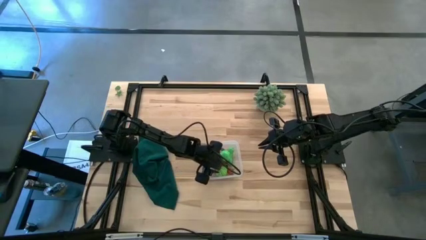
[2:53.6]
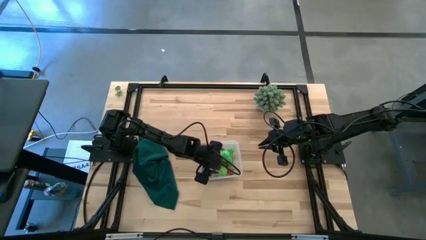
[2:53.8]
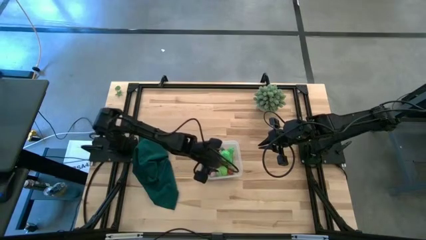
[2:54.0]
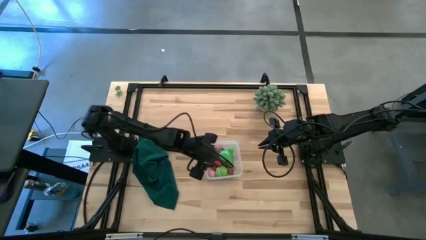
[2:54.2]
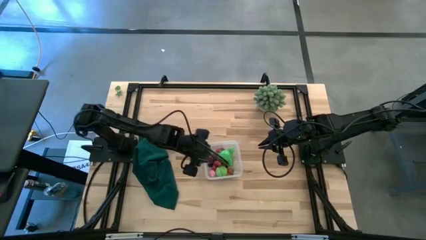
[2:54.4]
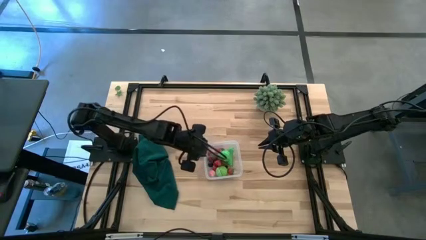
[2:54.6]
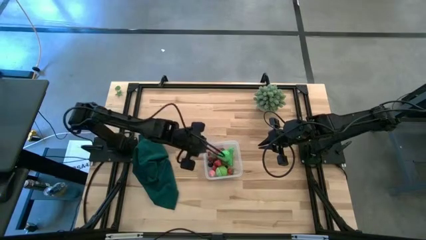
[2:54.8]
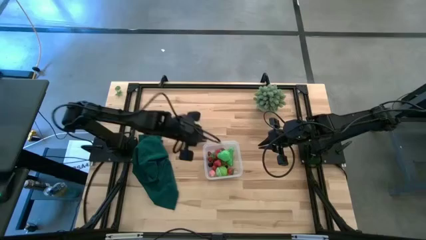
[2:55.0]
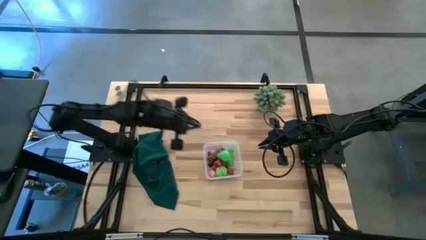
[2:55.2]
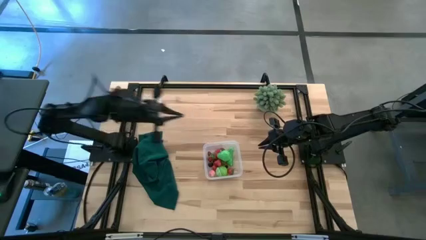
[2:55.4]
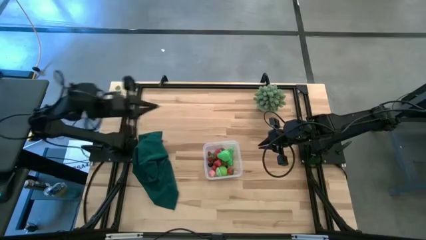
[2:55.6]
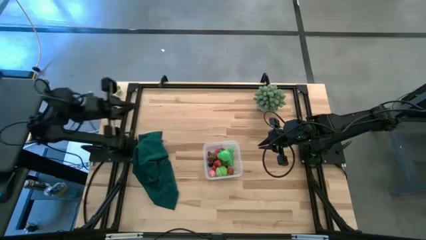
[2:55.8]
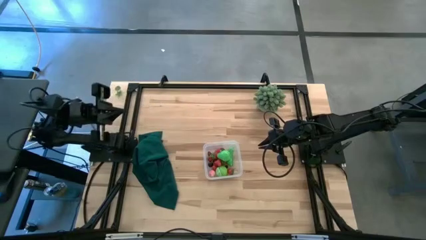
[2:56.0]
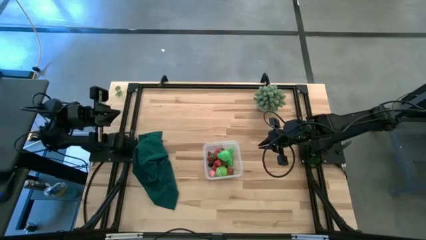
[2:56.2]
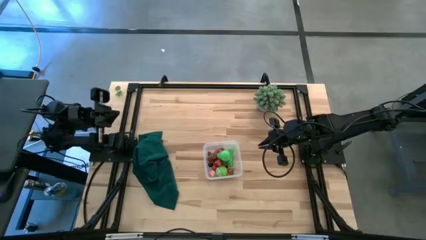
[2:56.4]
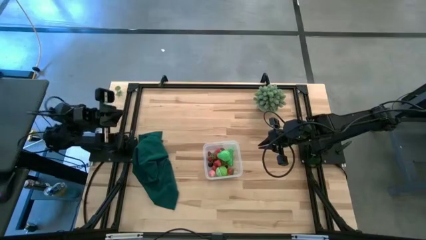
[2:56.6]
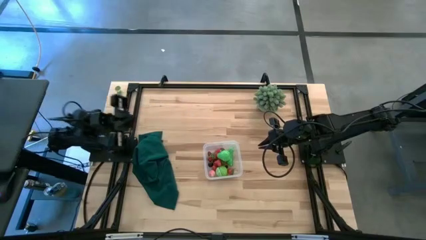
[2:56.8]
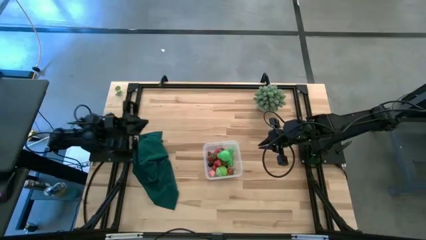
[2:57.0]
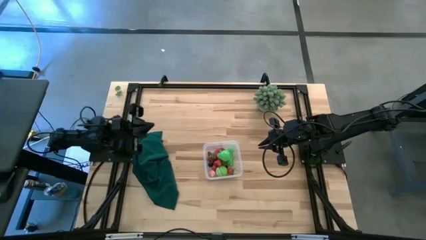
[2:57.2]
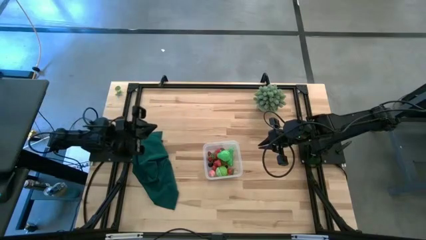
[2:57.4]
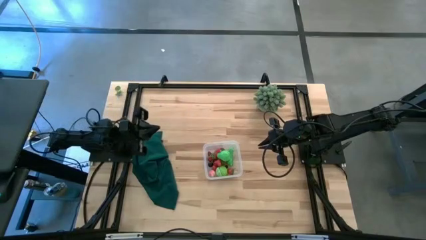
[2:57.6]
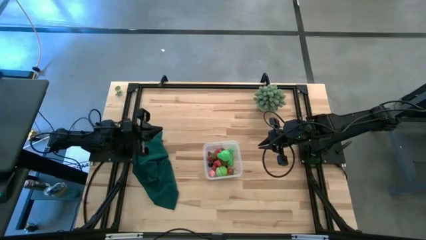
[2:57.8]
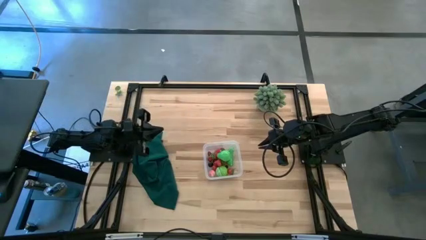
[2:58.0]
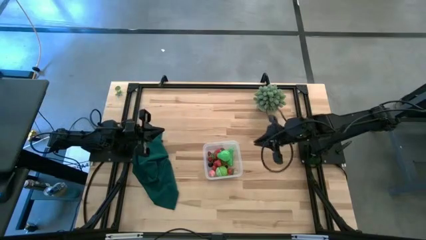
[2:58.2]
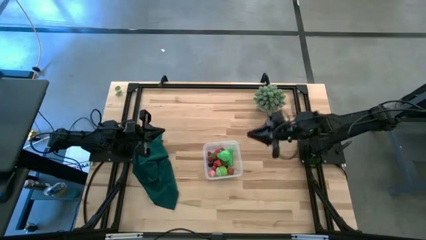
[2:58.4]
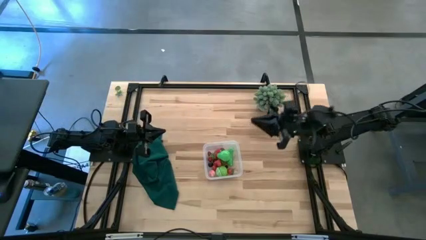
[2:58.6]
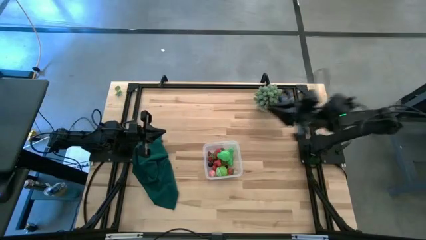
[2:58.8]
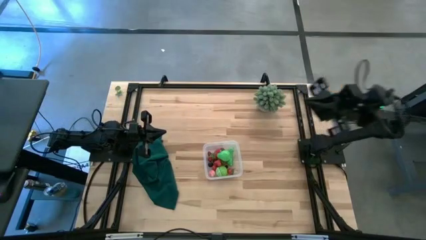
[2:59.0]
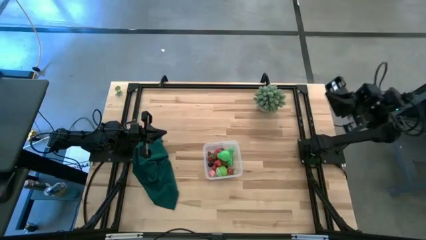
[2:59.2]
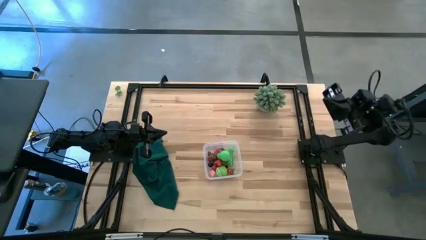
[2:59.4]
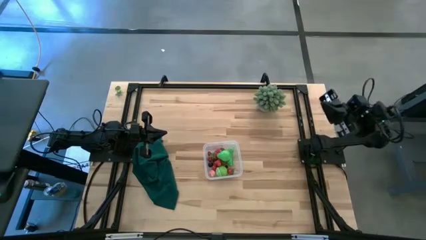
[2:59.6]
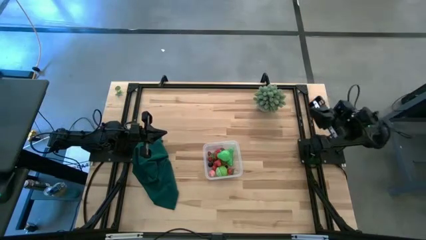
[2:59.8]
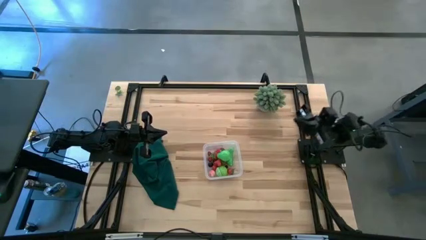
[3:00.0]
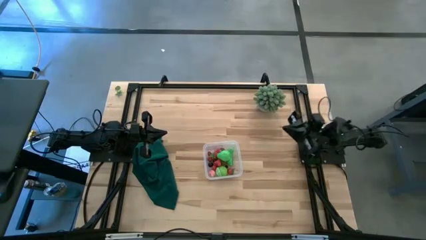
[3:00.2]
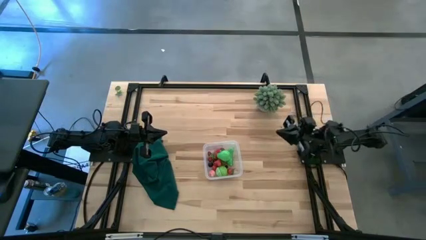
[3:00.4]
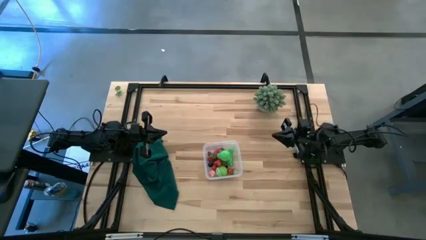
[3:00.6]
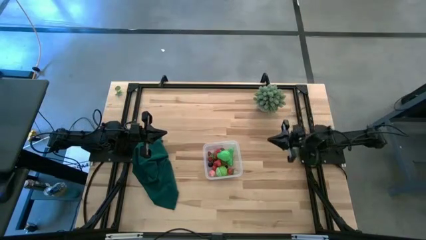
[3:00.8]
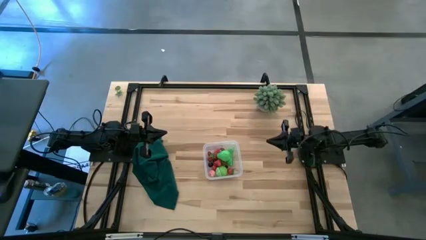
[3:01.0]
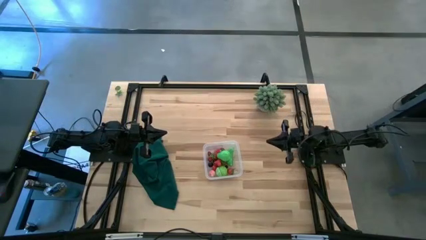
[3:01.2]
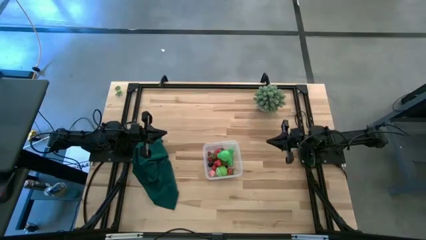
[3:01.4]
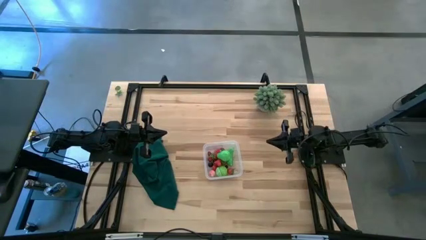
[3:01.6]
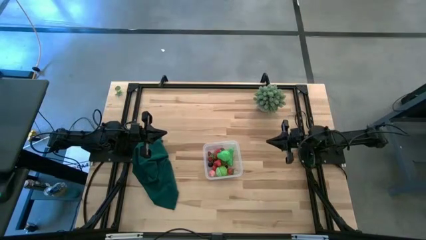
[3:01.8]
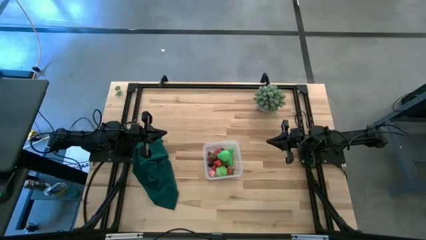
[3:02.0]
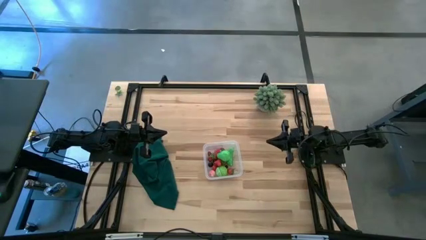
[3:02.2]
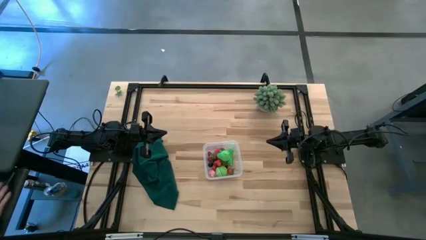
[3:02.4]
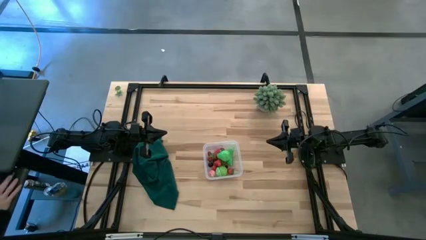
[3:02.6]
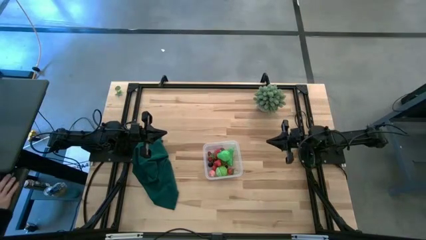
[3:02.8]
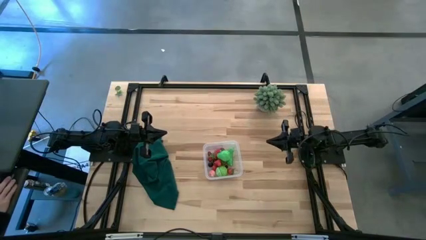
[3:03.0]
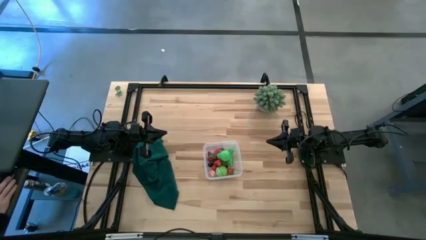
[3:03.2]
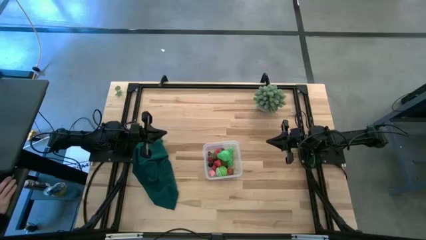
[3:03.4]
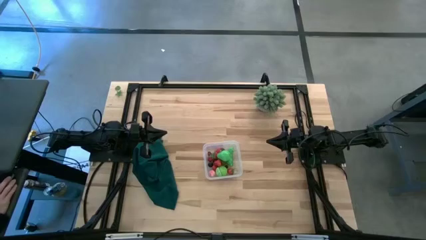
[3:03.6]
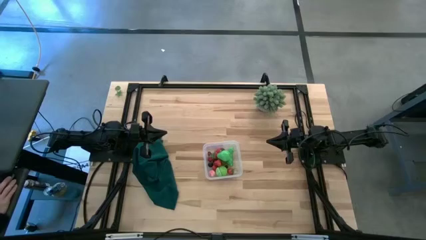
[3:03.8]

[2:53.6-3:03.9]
Task: Pick and placing Produce into tupperware
Return to Home Position

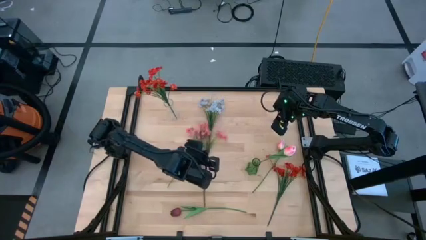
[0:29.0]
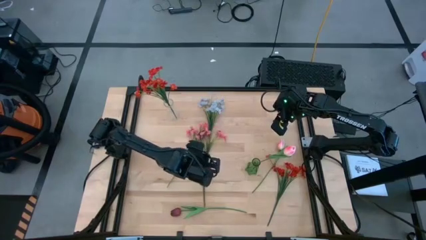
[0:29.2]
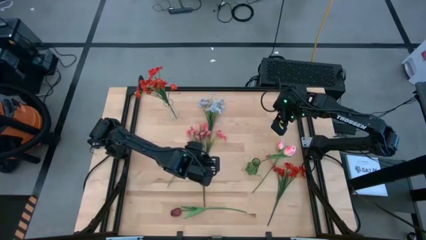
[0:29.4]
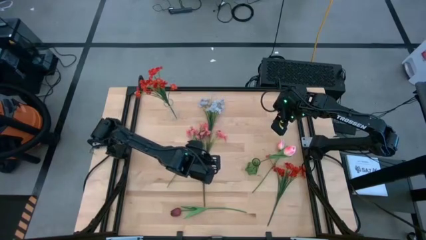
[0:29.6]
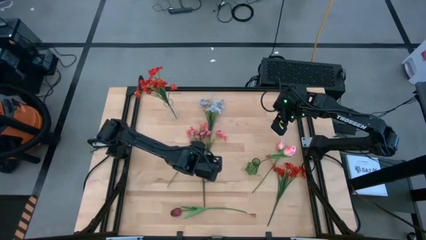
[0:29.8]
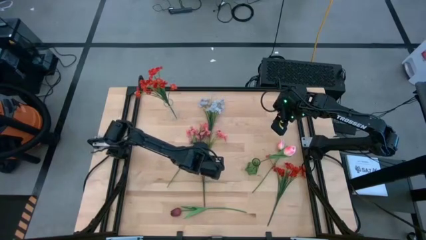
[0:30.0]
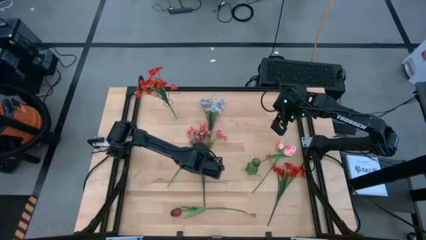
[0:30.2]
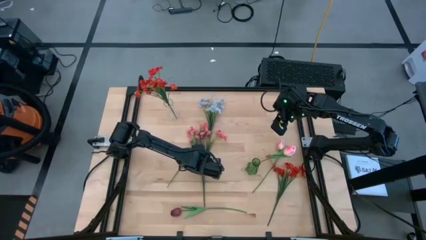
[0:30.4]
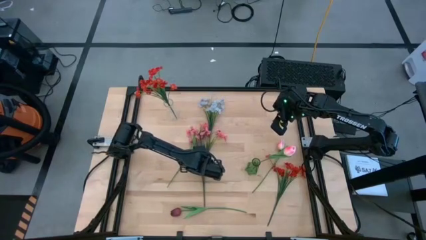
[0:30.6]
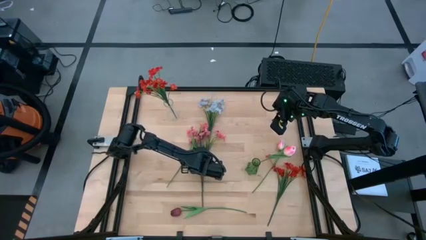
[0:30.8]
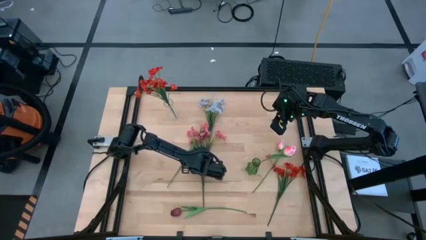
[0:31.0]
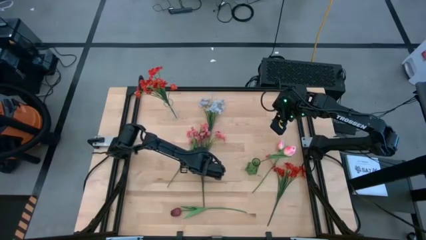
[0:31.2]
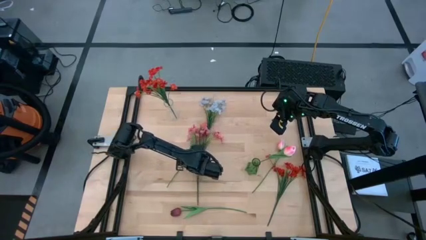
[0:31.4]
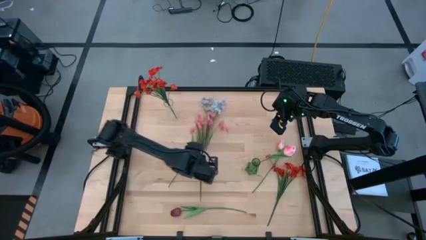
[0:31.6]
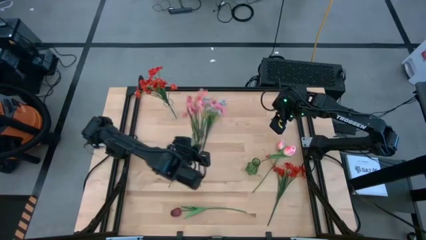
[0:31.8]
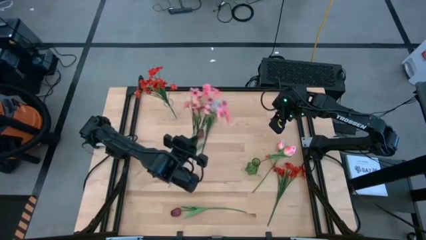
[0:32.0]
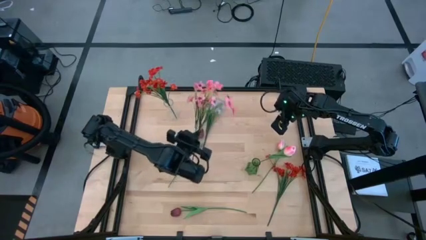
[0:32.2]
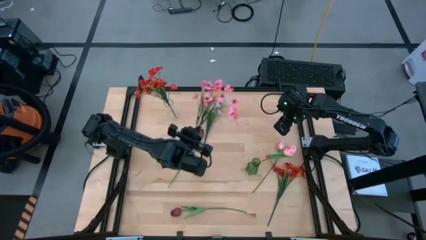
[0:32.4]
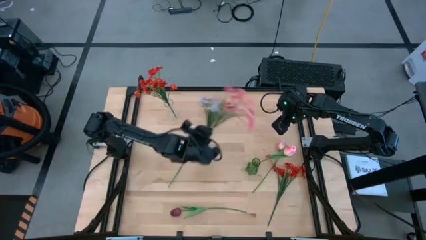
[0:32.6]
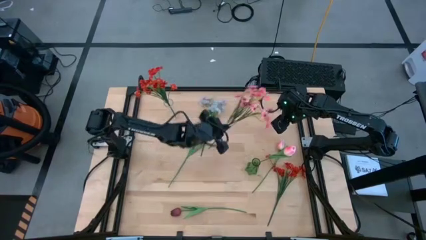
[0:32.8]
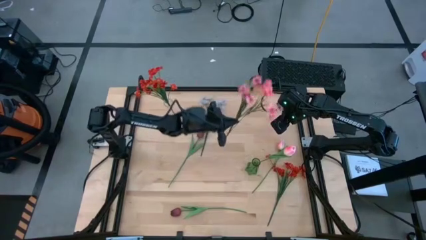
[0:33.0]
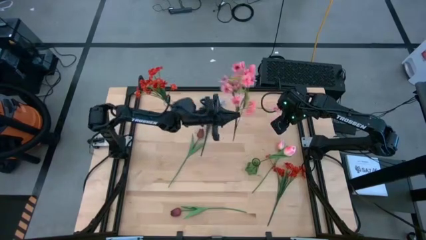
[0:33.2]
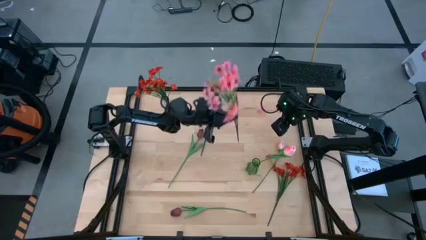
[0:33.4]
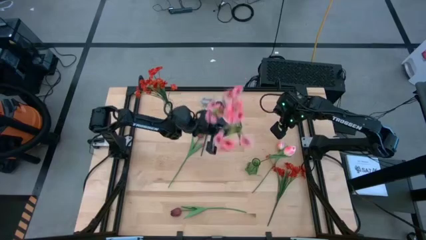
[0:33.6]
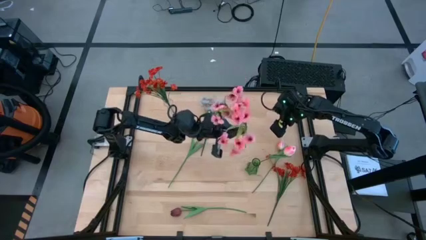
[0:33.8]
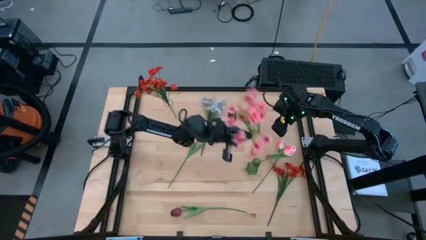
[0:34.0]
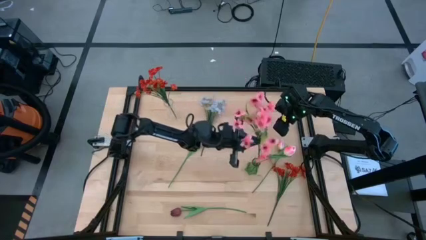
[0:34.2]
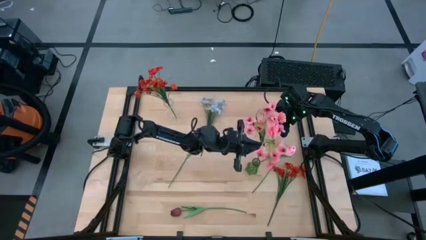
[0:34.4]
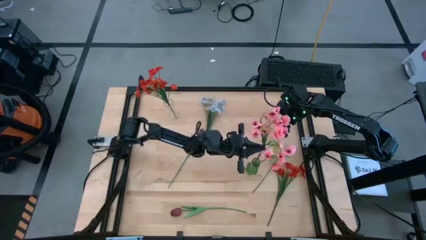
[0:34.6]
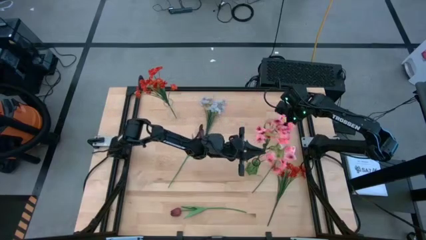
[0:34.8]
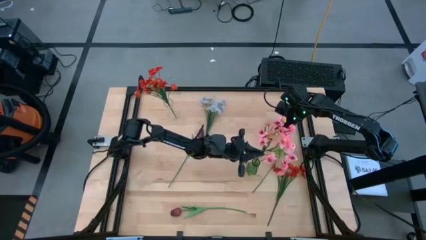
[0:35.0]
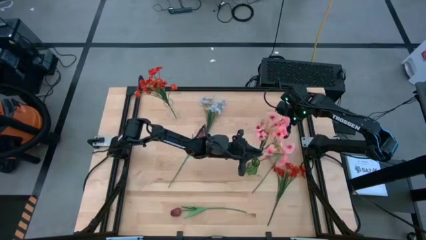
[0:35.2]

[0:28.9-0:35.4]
Task: Sort flowers into vase by color
Put the pink flowers into the green vase
